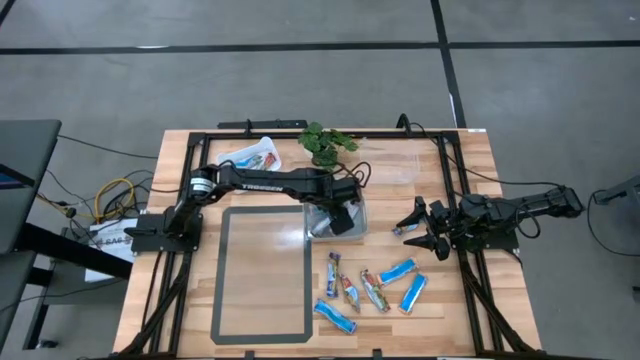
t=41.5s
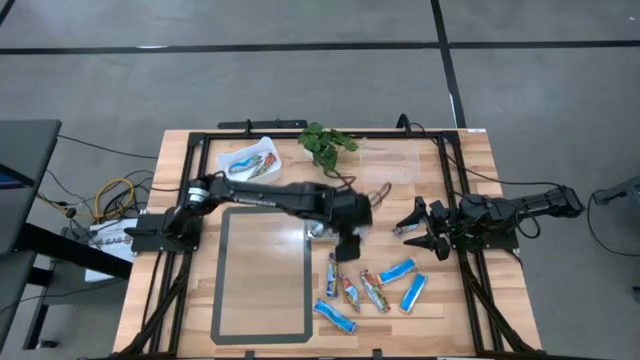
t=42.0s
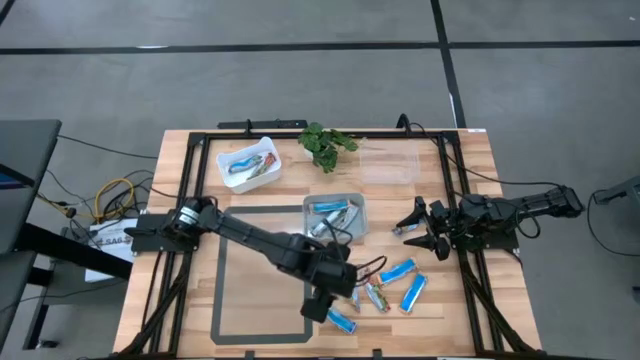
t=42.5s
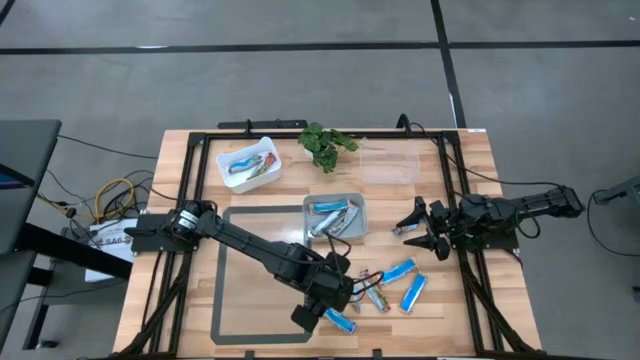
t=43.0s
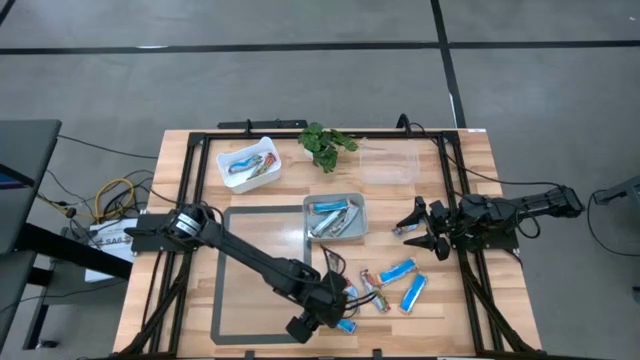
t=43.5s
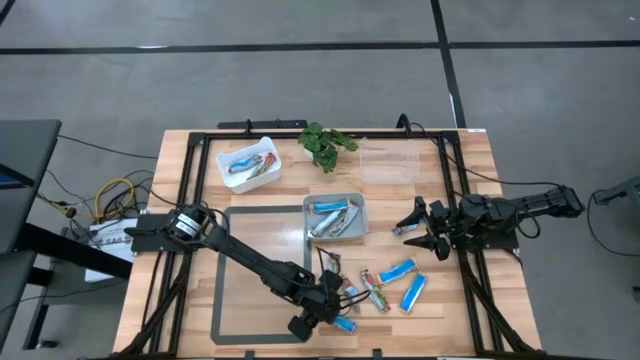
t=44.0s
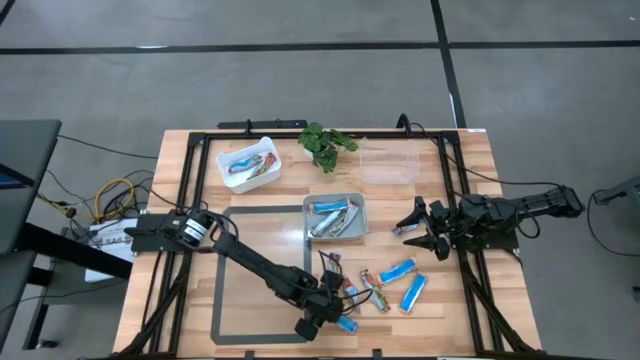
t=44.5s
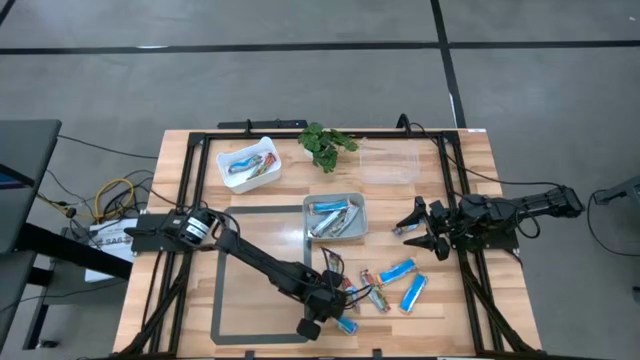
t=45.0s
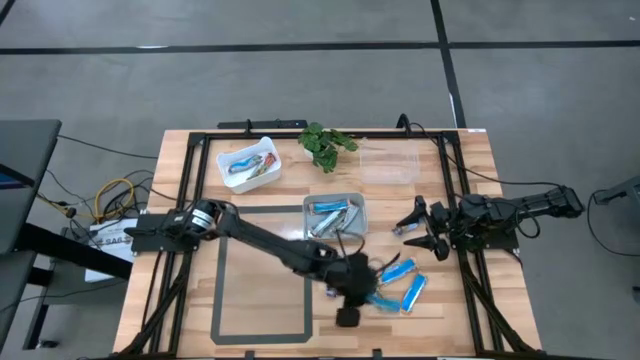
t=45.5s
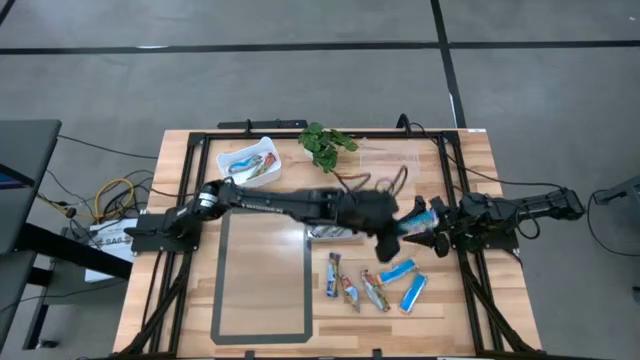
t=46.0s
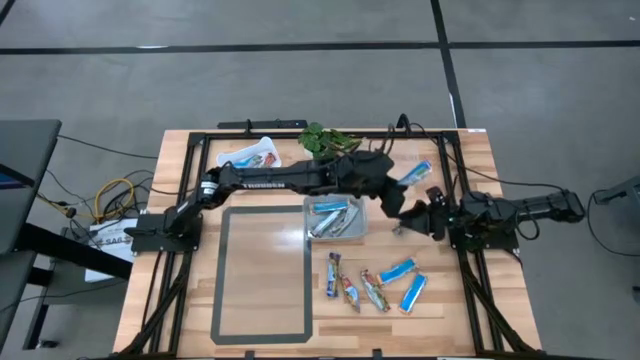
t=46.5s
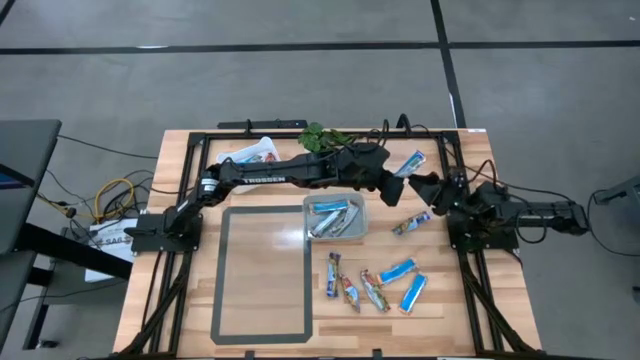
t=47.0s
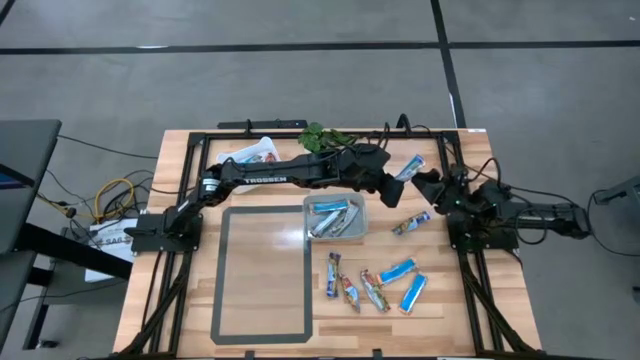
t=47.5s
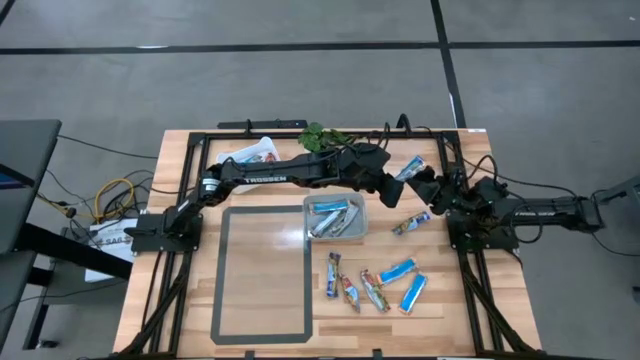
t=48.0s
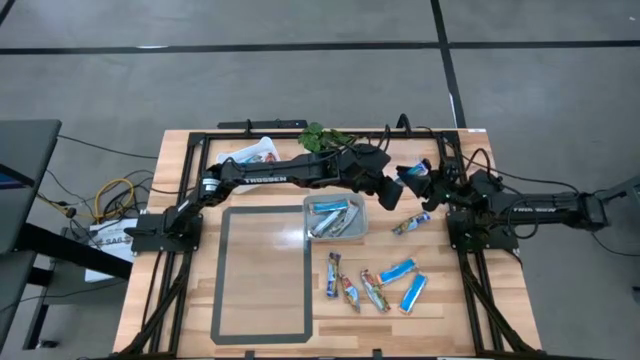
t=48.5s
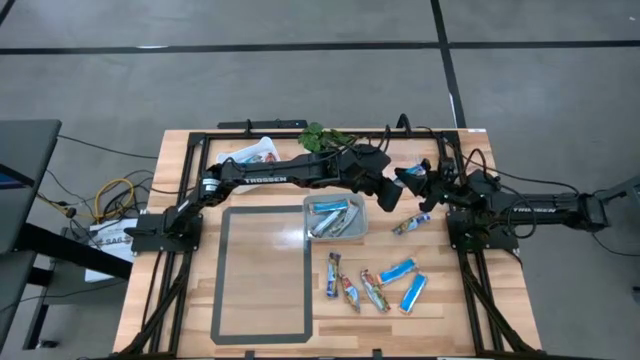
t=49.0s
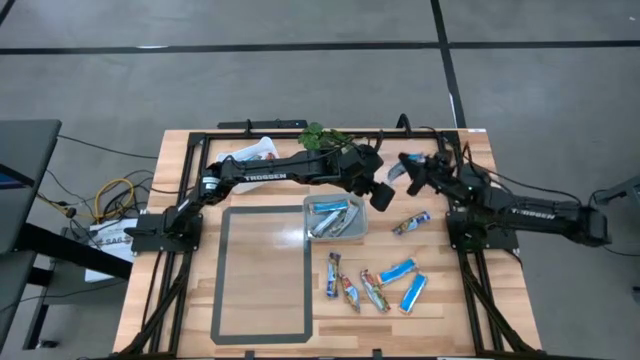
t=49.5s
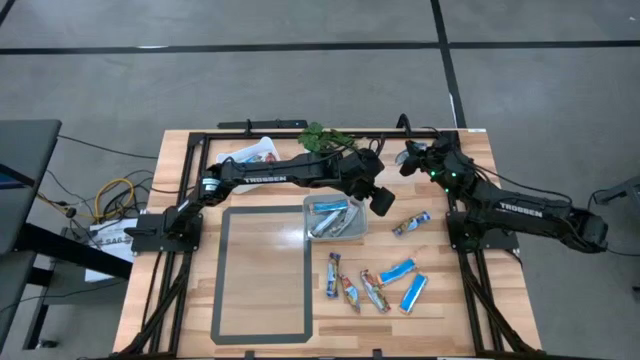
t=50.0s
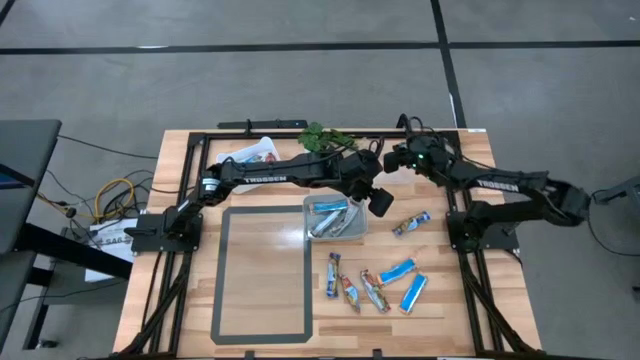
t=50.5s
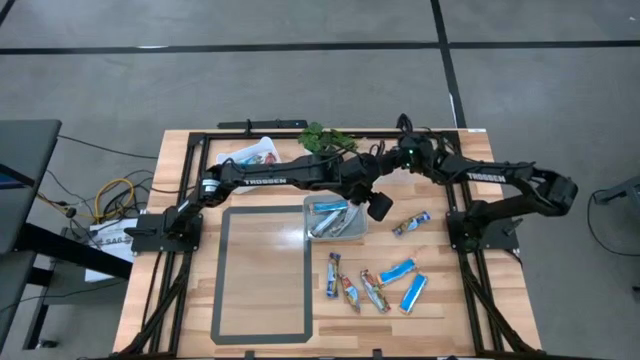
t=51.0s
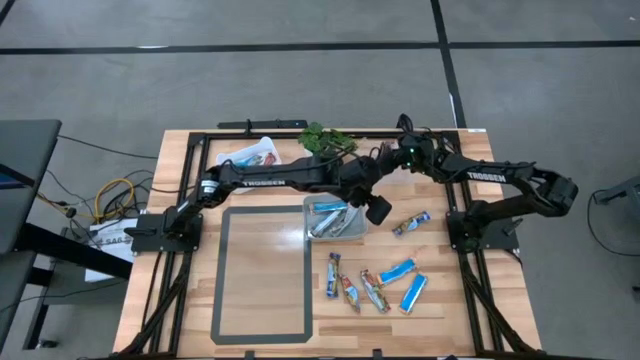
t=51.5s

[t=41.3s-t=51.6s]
Task: Pick and place Granola Bars by type
Put the blue granola bar into the transparent bin

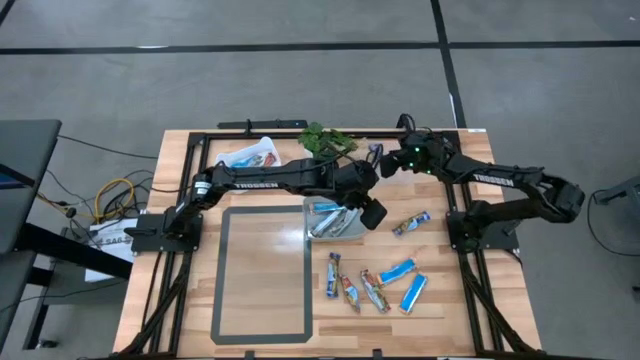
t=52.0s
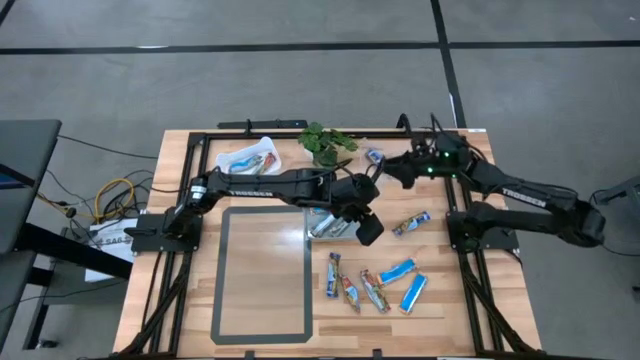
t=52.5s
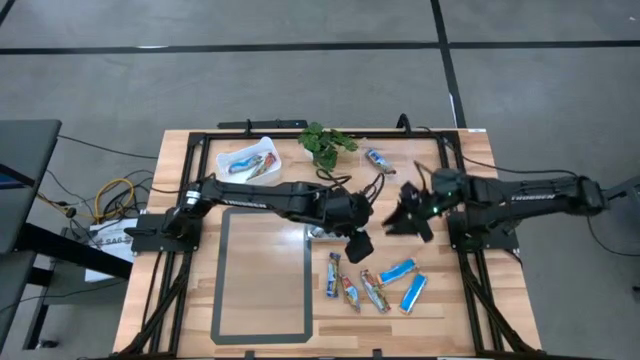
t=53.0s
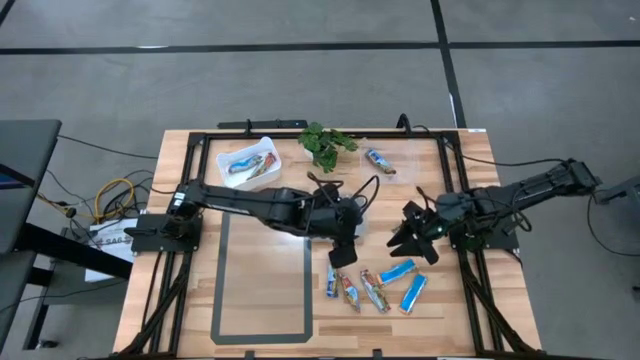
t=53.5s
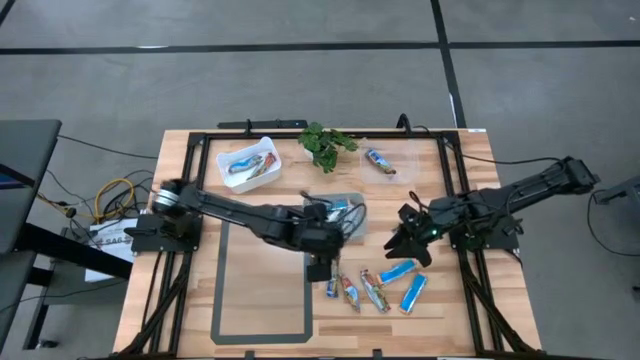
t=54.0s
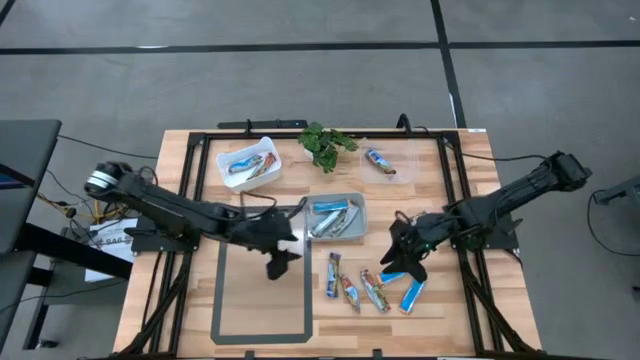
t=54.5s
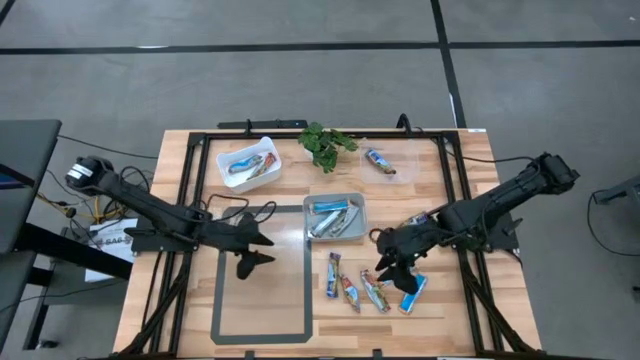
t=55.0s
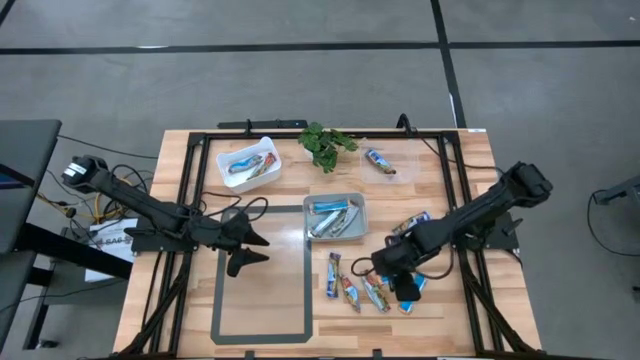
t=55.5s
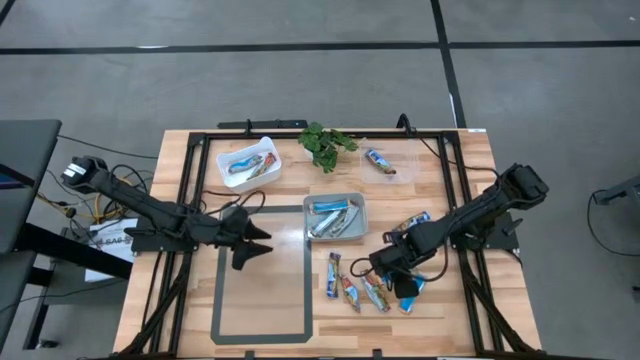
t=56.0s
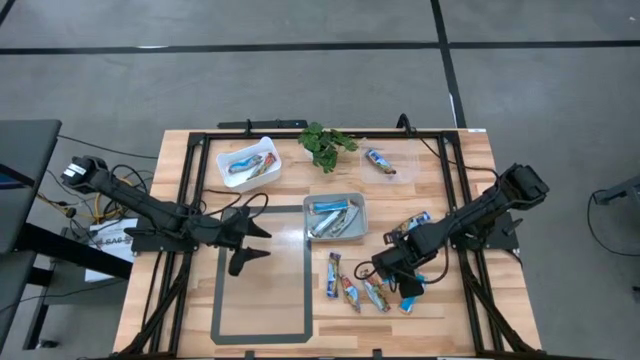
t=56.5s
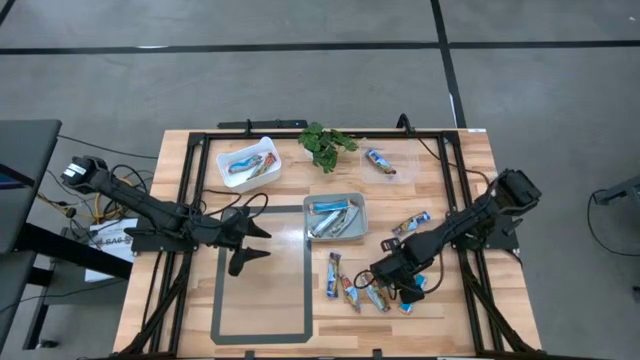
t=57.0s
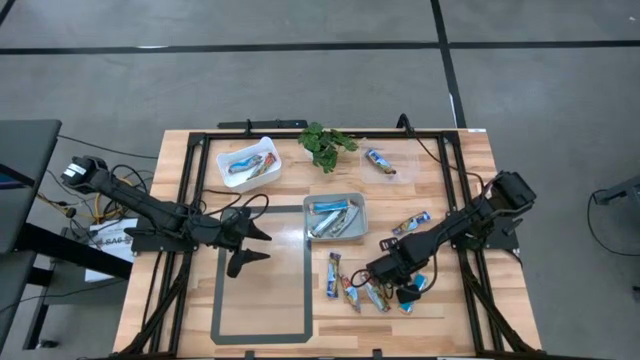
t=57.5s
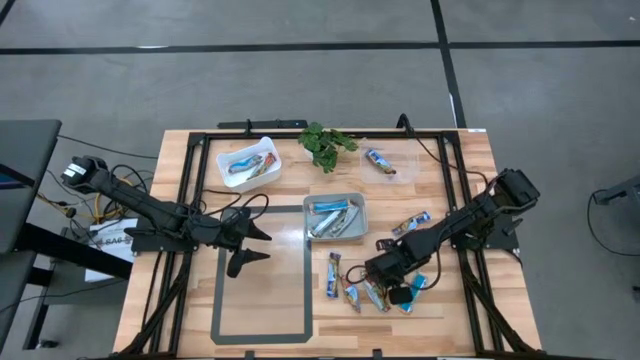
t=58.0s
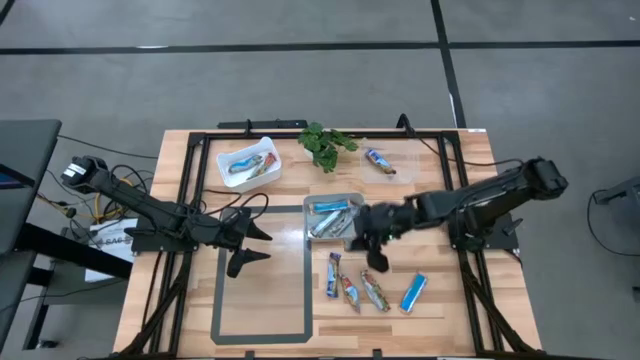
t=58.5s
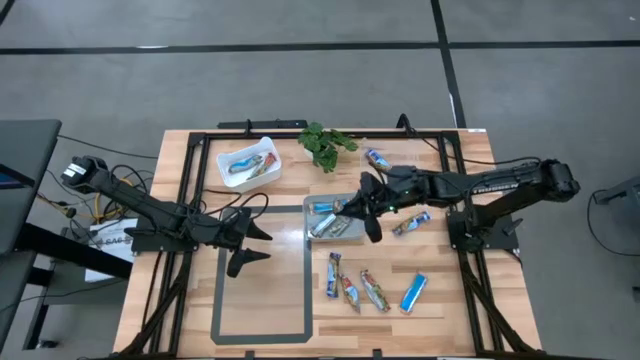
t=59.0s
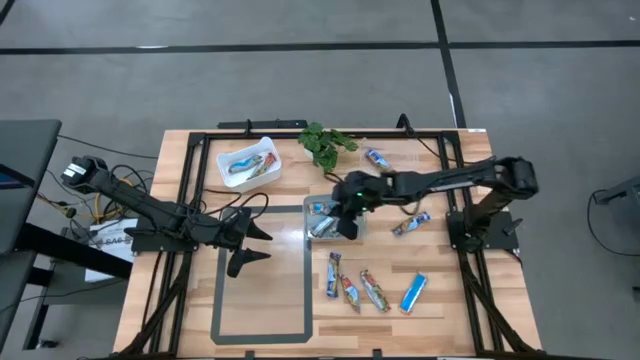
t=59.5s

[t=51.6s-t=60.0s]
Put the yellow granola bar into the gray bin

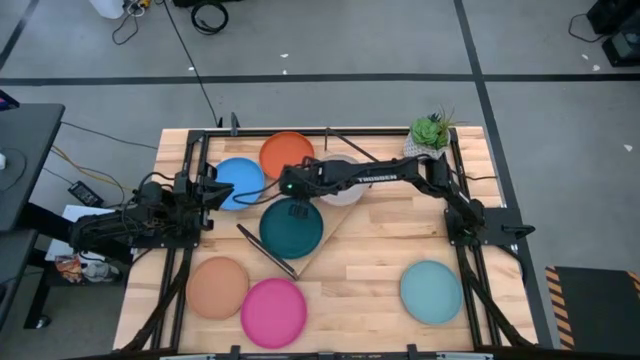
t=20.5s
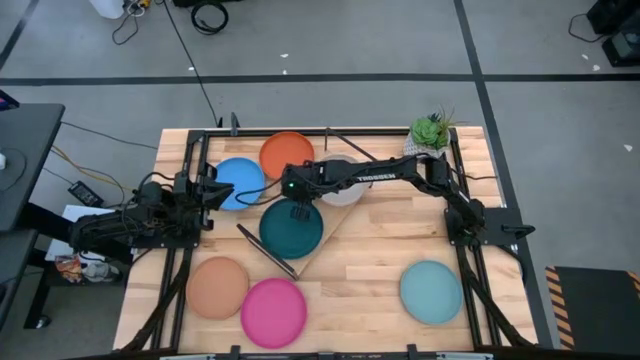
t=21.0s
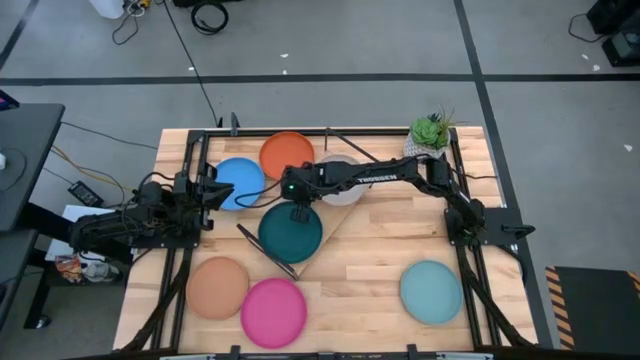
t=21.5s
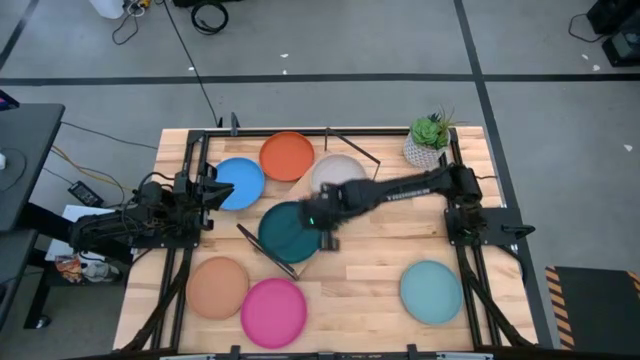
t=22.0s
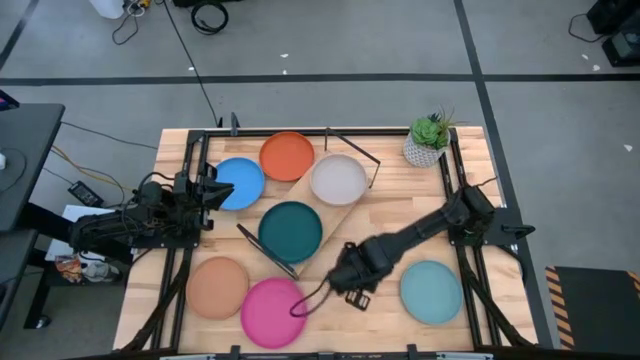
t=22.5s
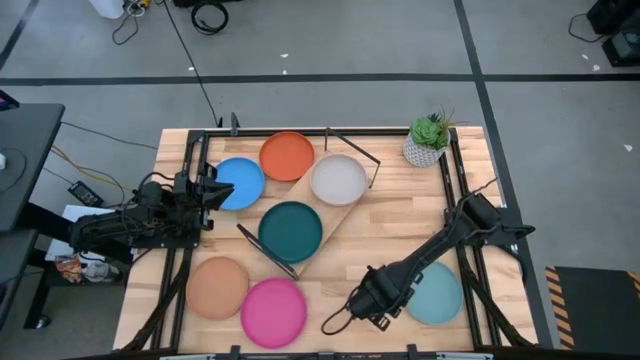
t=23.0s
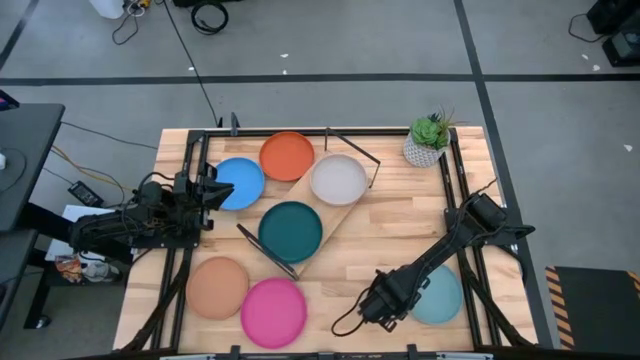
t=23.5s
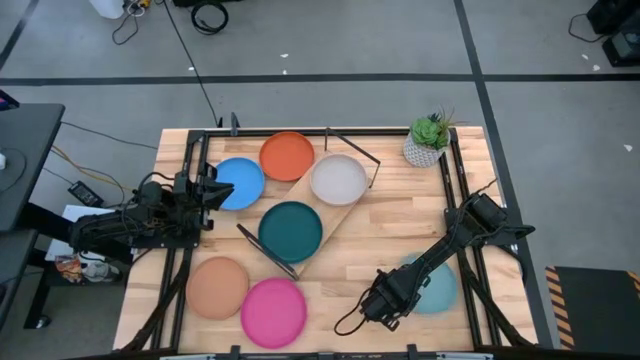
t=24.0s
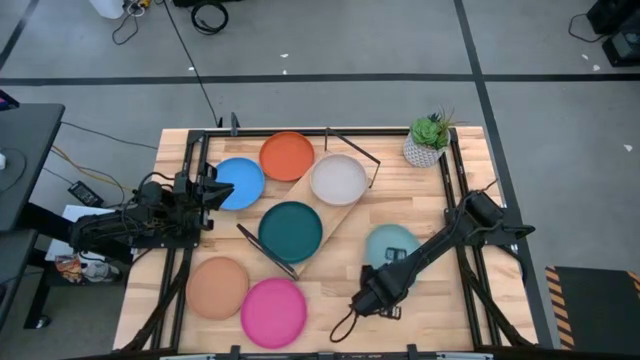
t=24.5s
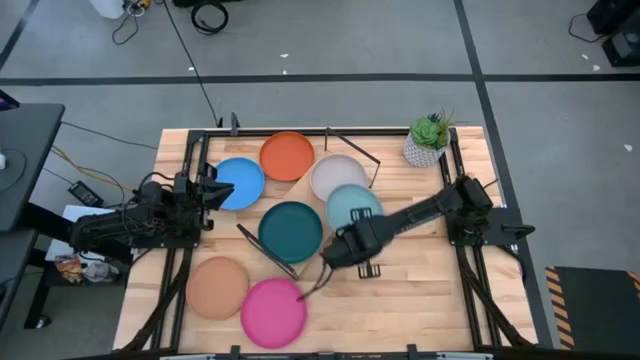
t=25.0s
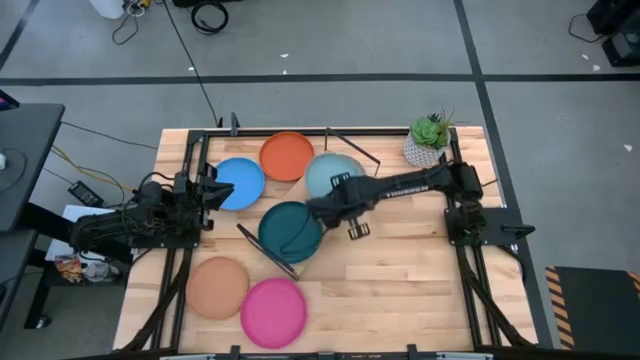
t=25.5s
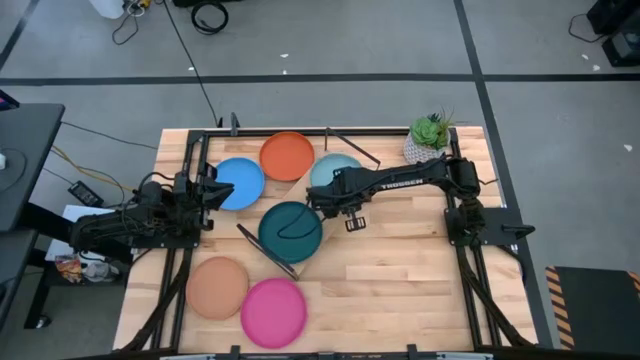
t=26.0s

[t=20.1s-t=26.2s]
Task: Place and stack plates onto a shelf
Stack the light blue plate on top of the gray plate on the shelf
